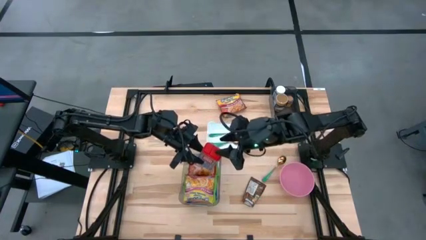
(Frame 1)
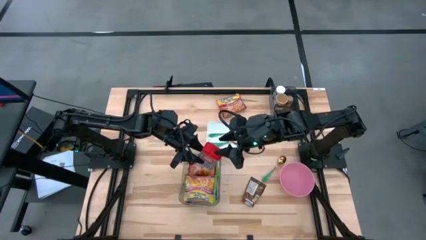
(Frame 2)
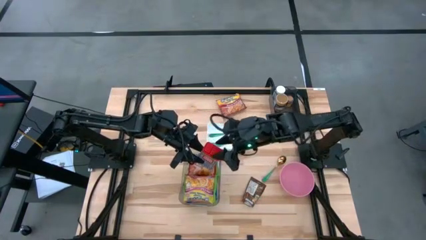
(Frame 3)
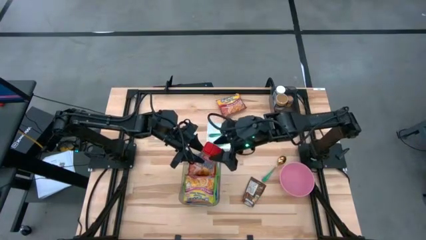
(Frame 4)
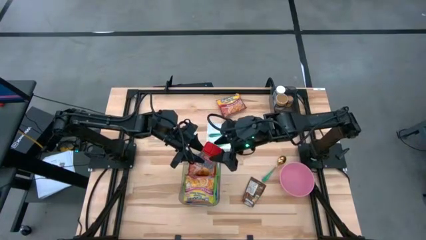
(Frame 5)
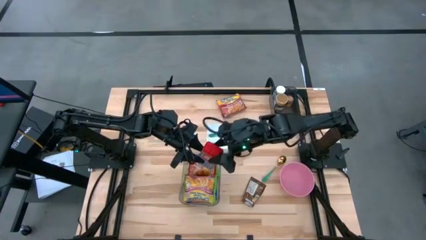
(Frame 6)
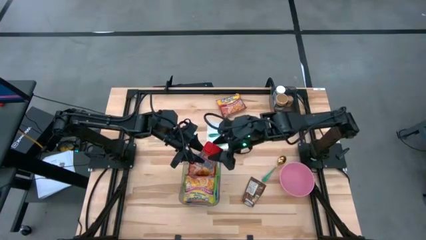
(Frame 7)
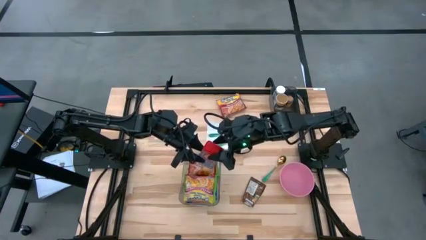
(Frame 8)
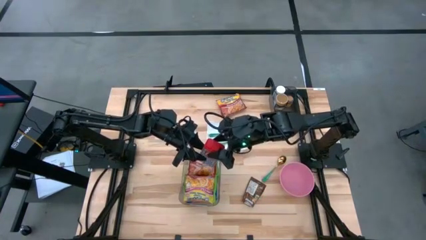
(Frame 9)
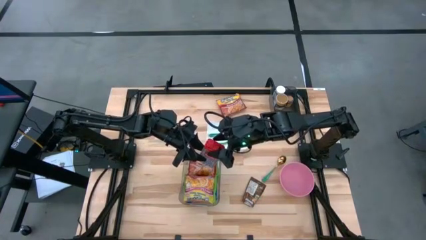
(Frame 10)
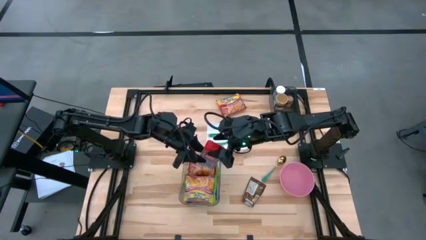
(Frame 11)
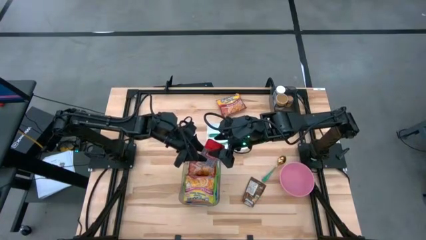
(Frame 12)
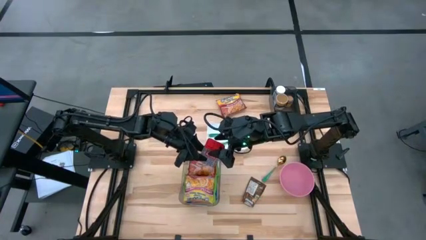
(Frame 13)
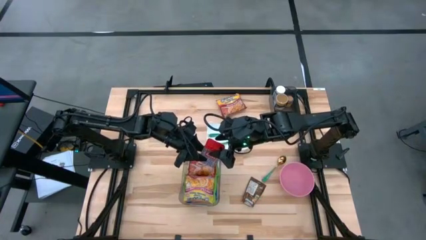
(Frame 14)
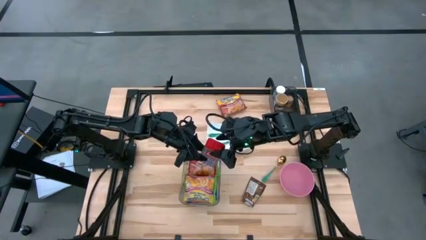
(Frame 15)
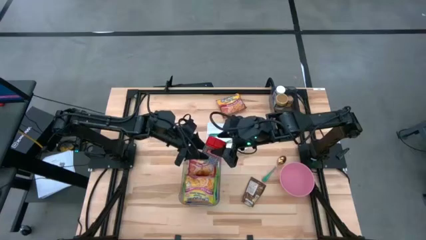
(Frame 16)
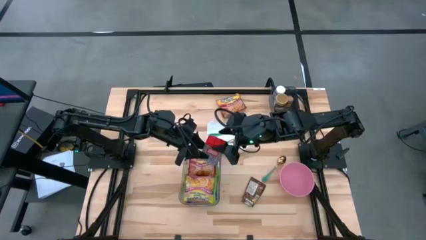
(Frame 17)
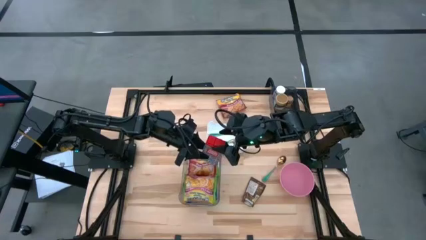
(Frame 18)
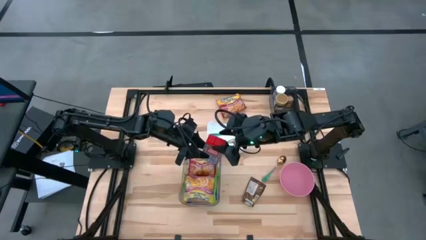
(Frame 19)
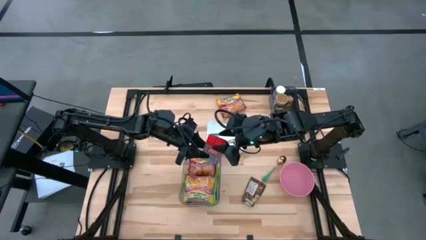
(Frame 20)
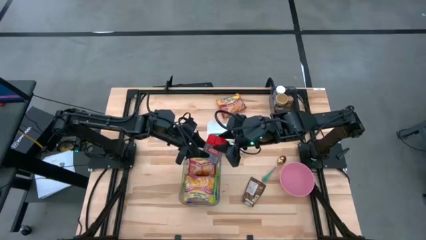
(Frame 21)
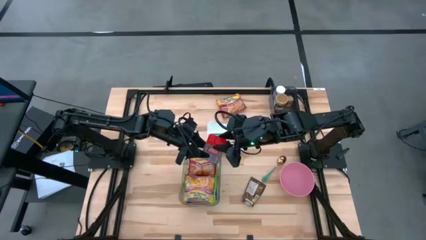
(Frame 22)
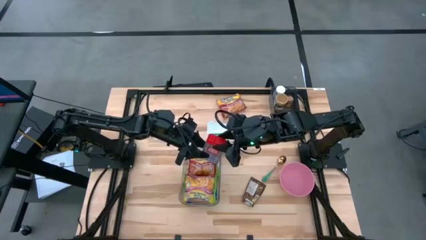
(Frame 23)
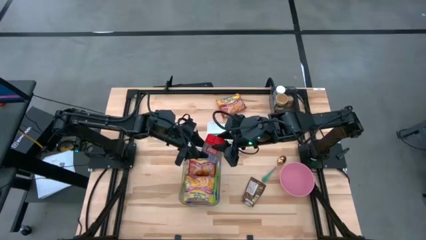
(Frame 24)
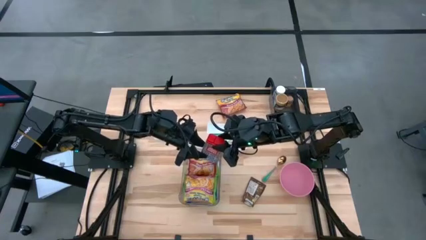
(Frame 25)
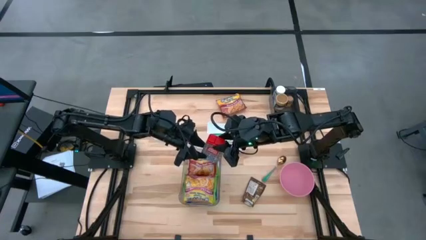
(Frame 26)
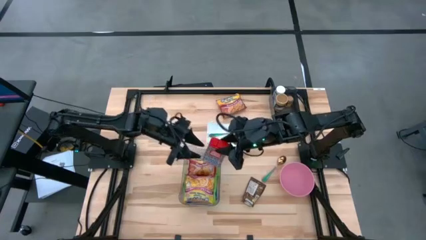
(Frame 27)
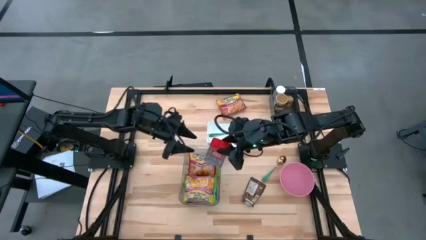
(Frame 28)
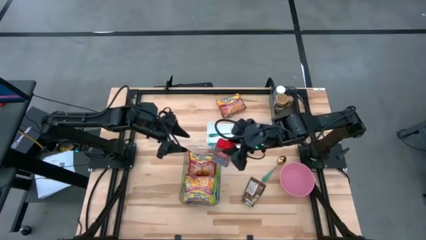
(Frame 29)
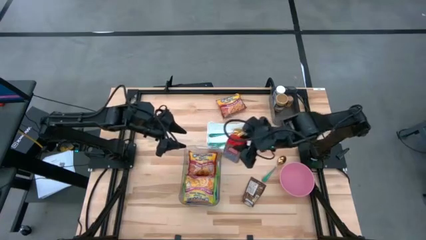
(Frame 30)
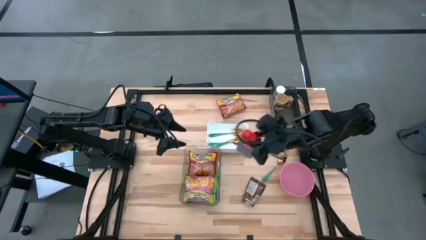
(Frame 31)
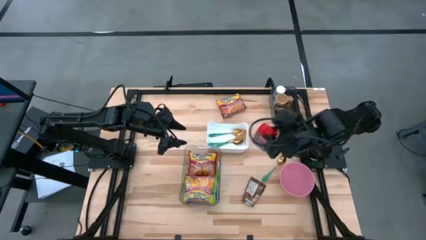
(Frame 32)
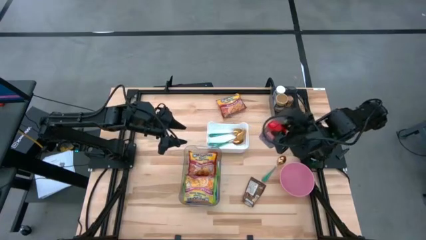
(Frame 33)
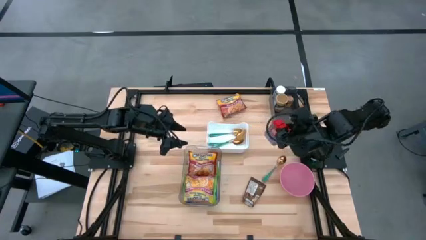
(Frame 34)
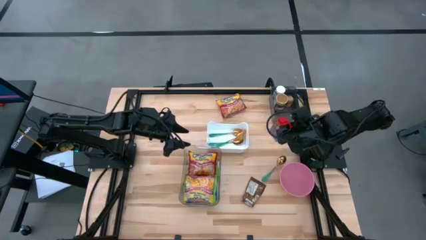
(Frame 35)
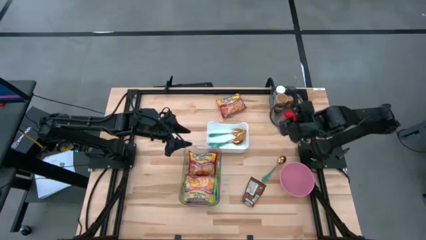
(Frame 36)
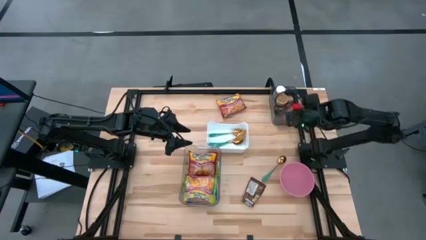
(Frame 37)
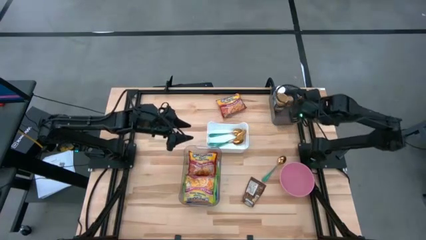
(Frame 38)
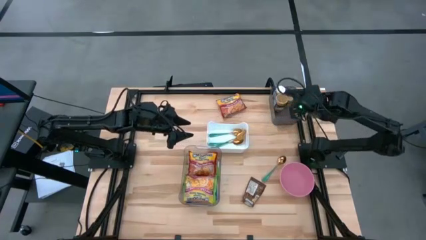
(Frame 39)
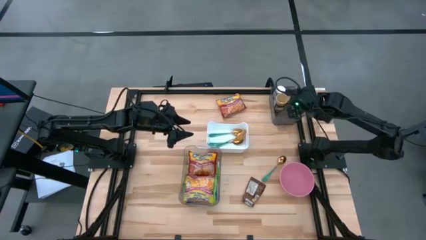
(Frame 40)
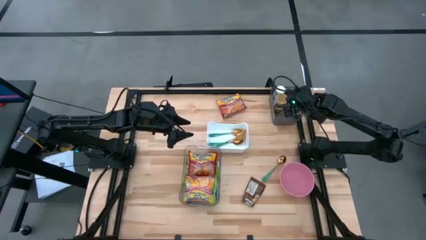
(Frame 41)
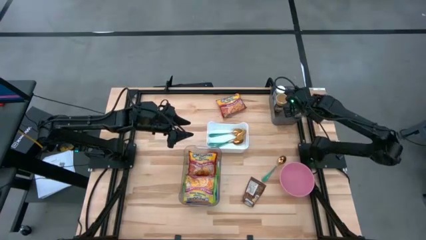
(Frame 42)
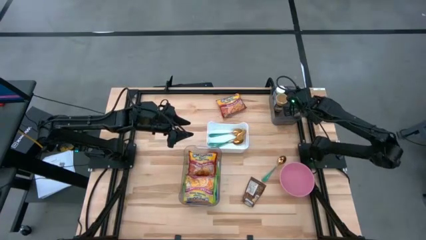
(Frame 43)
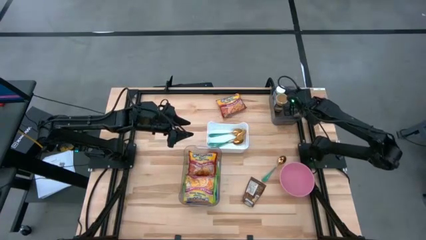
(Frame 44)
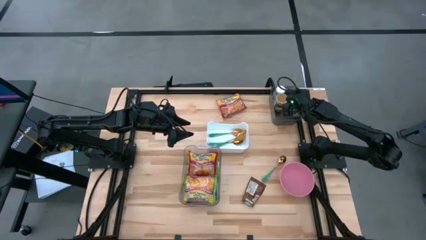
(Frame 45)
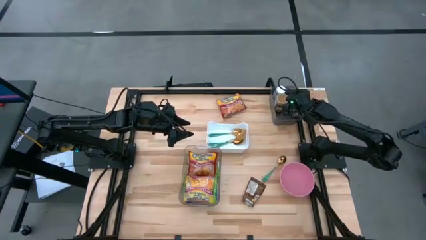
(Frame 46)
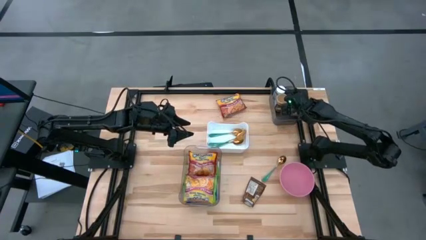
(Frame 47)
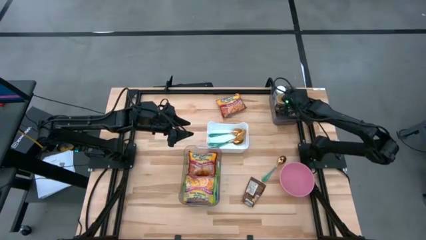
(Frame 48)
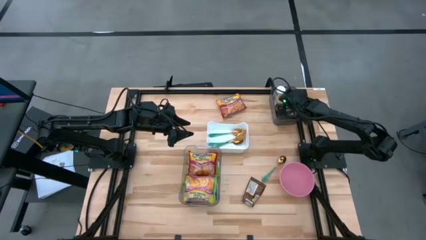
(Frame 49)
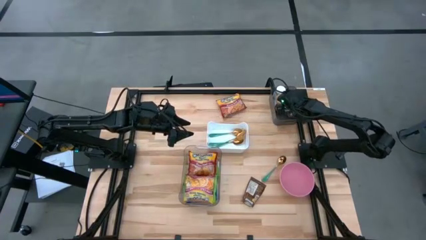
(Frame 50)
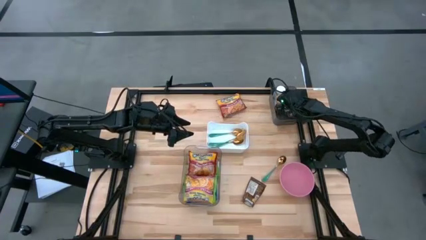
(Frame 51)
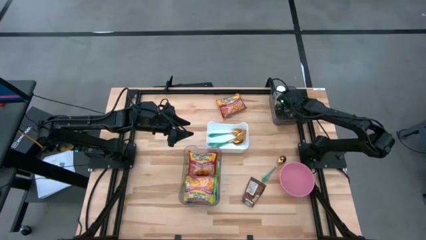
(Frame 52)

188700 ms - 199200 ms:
Task: Pick & Place Food Item
Put the red spice can into the black bin

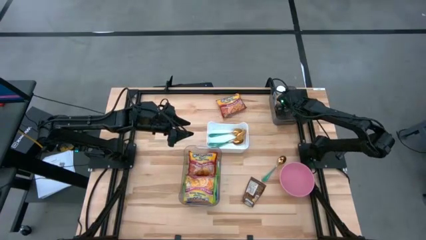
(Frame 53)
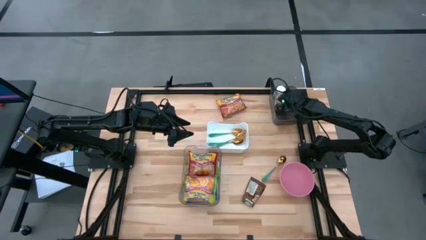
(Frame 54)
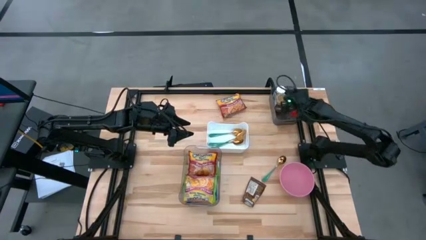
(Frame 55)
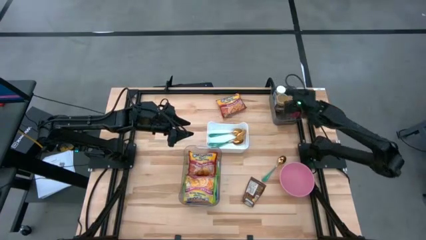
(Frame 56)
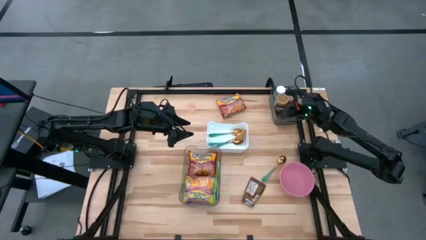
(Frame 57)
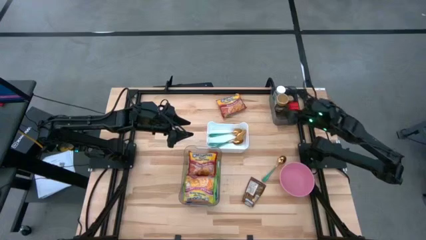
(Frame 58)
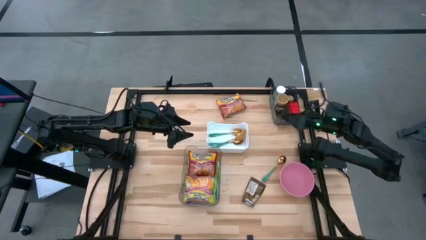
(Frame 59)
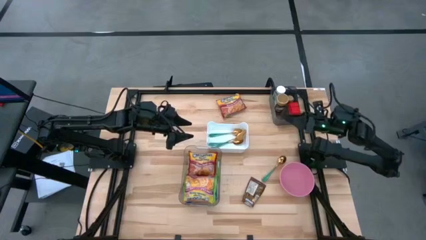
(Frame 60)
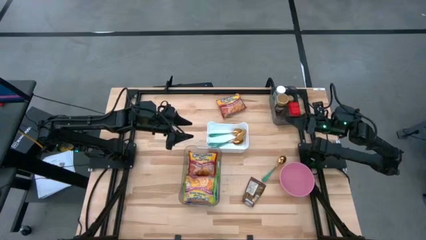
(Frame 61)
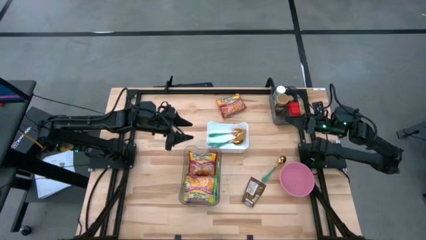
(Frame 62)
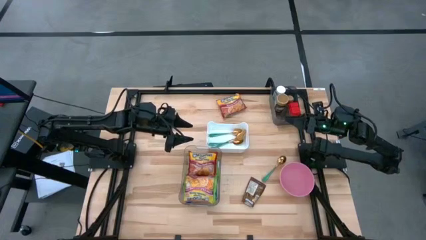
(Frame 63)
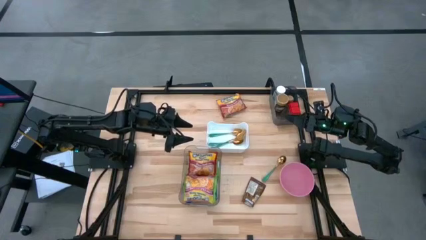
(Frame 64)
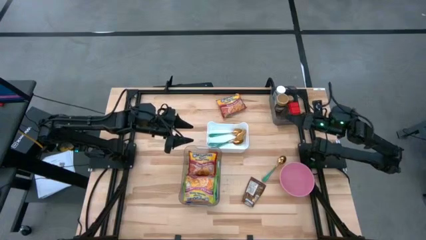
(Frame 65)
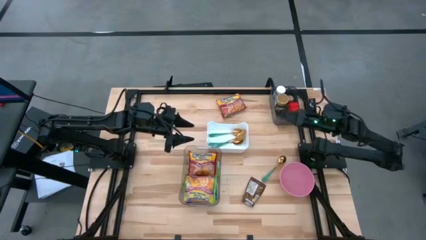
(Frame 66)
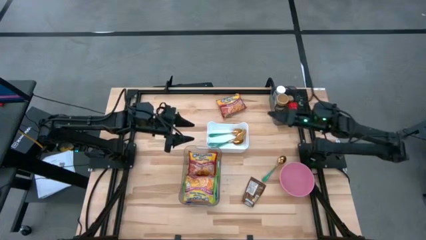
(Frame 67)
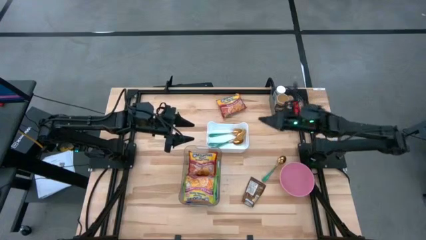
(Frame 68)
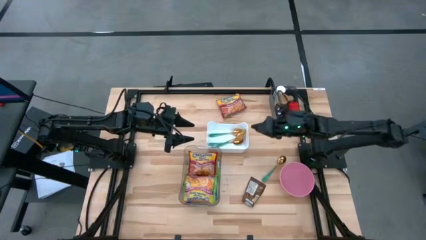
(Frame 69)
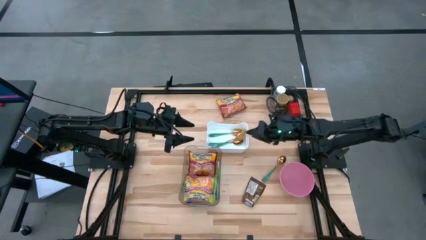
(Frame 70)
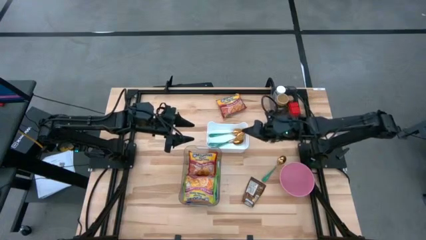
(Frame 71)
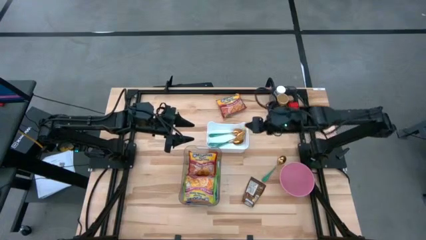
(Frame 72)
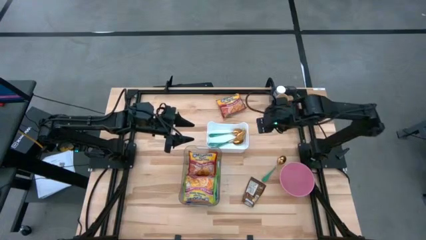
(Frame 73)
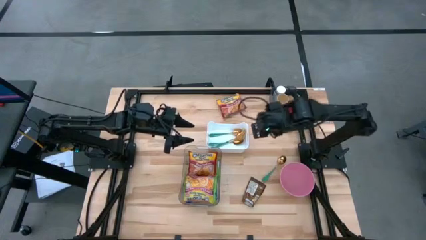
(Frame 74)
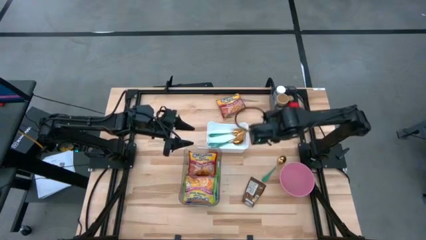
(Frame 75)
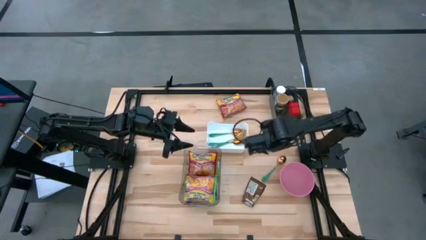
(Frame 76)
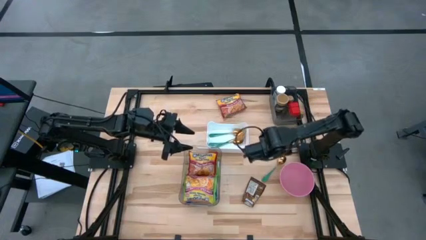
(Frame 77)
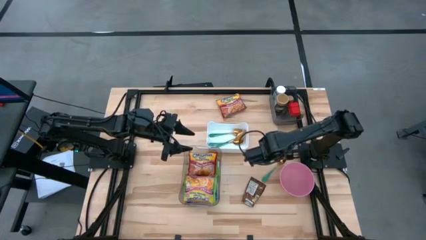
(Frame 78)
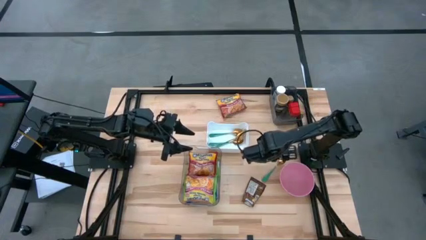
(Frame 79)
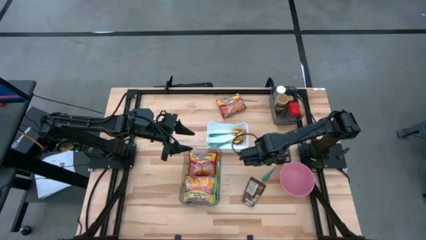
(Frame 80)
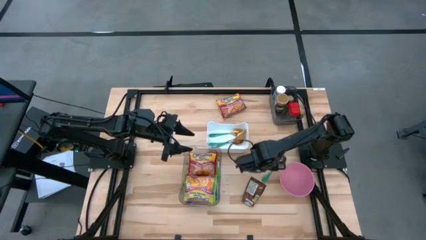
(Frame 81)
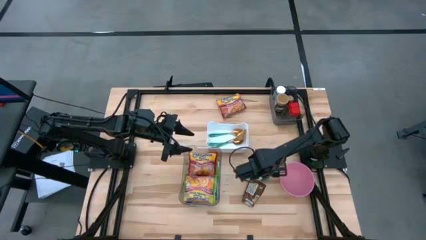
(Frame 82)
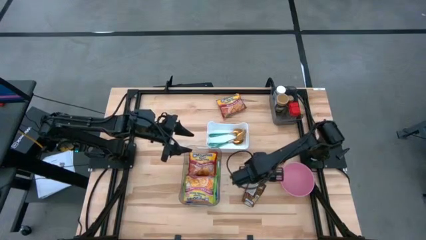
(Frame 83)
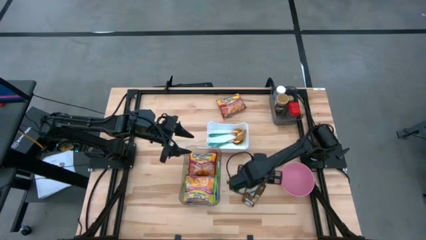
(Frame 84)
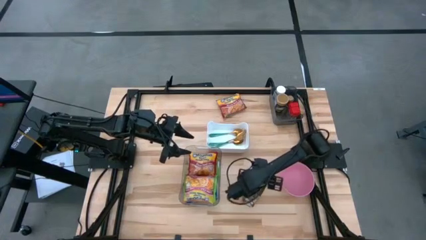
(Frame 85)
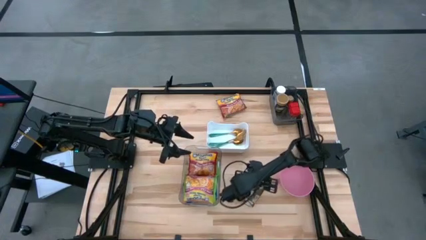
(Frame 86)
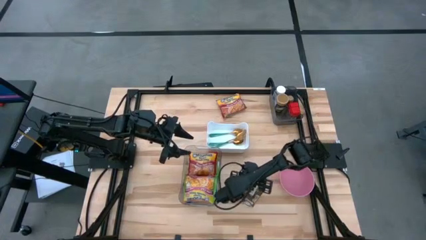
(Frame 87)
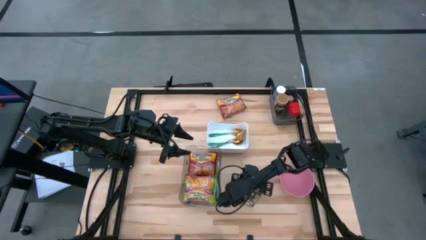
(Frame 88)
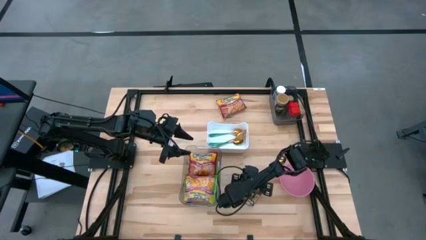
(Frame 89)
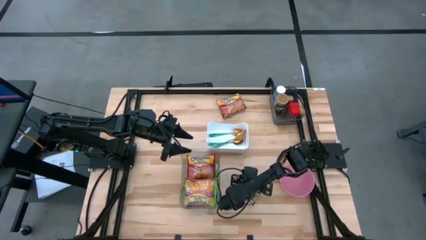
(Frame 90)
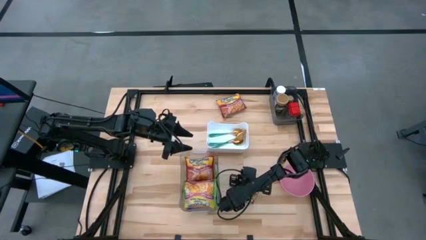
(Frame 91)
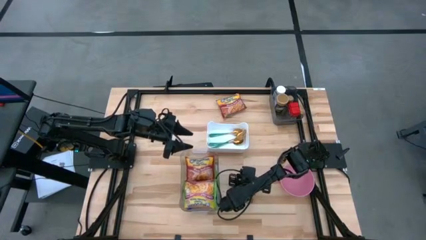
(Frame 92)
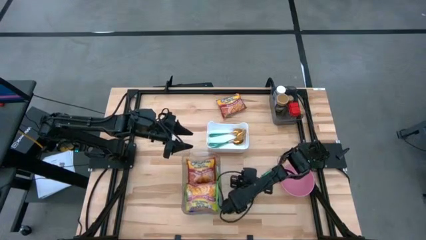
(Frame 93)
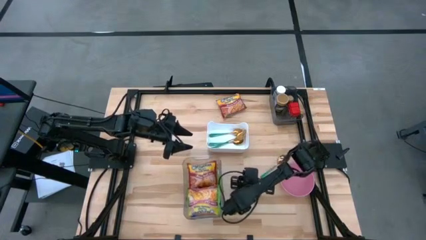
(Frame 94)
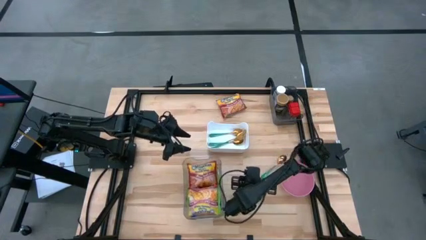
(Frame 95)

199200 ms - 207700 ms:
Adjust the transparent bin
